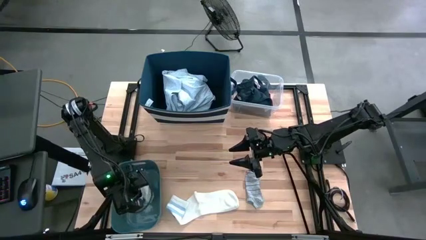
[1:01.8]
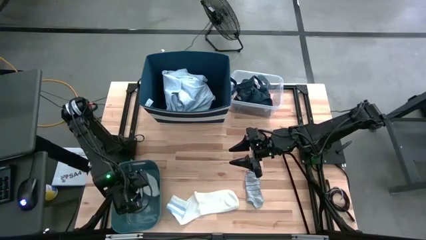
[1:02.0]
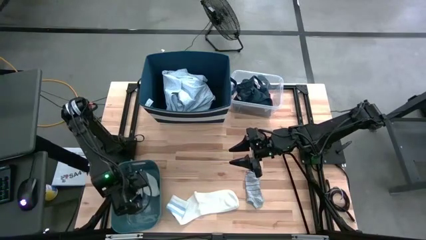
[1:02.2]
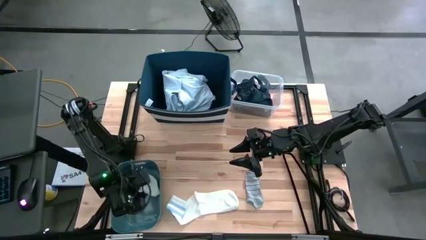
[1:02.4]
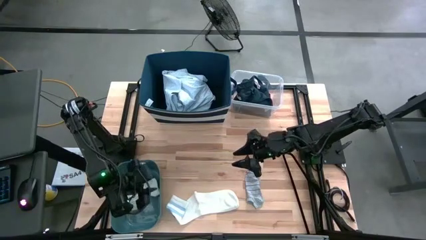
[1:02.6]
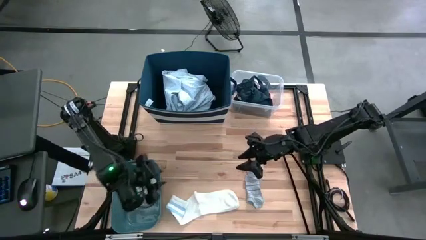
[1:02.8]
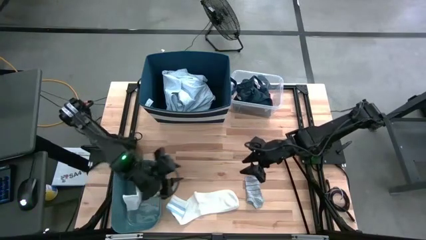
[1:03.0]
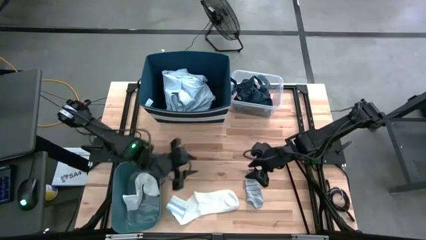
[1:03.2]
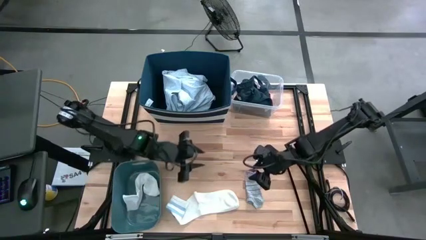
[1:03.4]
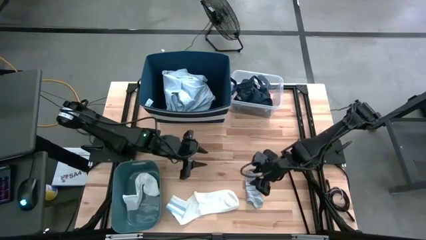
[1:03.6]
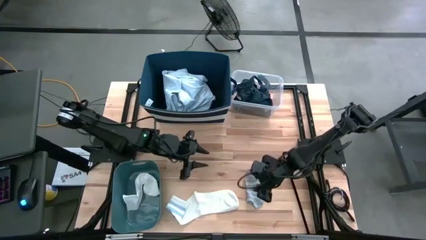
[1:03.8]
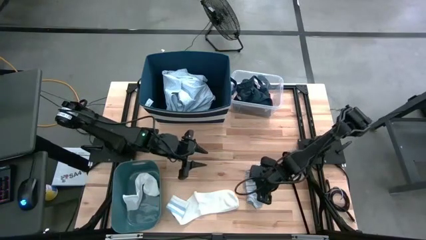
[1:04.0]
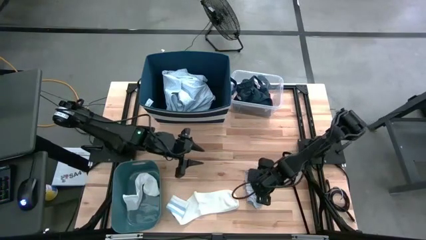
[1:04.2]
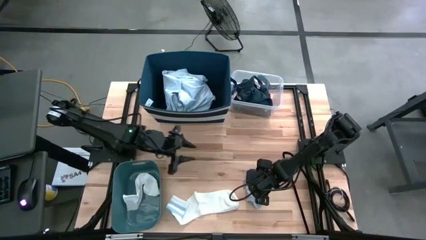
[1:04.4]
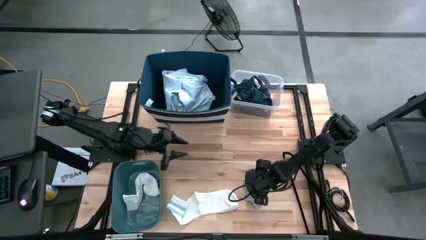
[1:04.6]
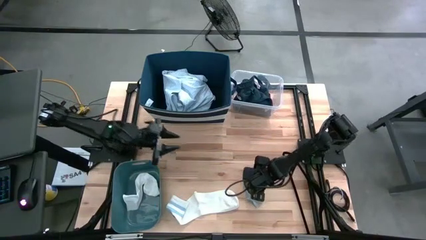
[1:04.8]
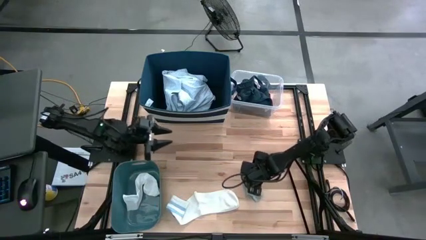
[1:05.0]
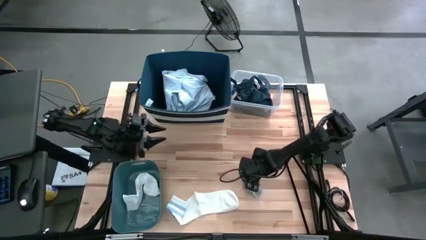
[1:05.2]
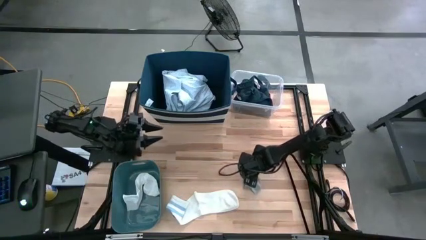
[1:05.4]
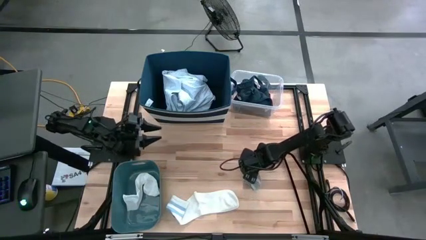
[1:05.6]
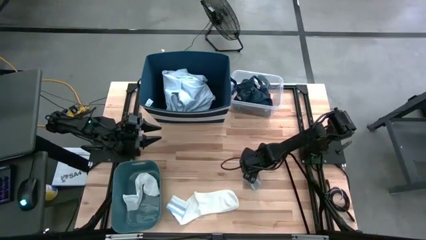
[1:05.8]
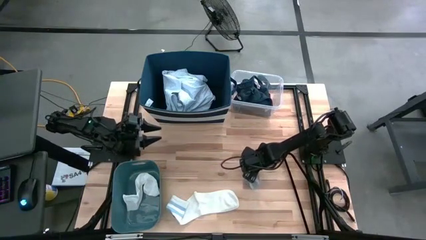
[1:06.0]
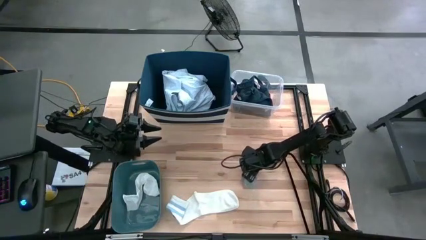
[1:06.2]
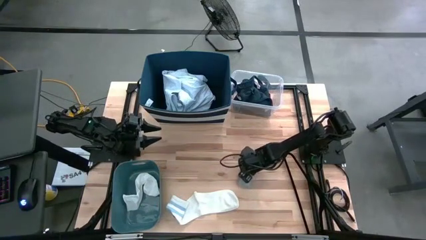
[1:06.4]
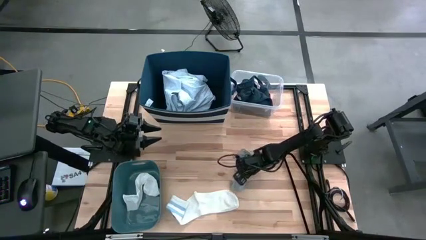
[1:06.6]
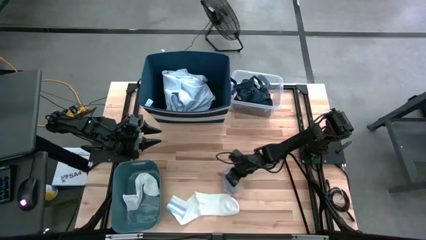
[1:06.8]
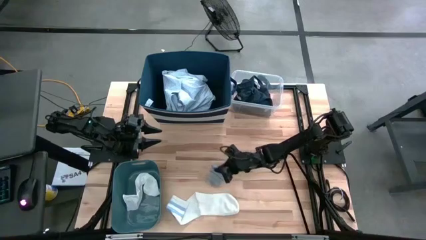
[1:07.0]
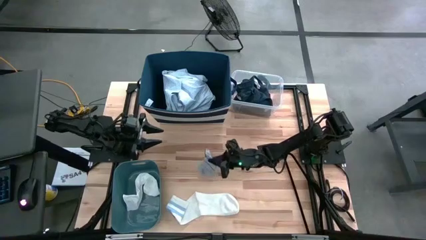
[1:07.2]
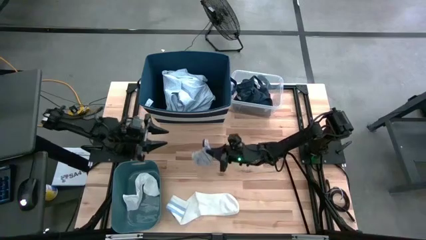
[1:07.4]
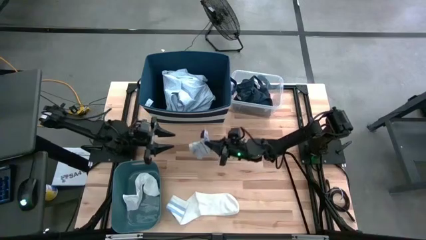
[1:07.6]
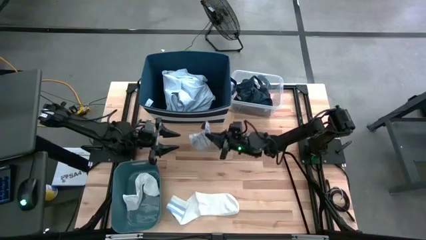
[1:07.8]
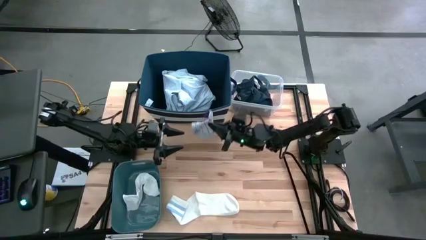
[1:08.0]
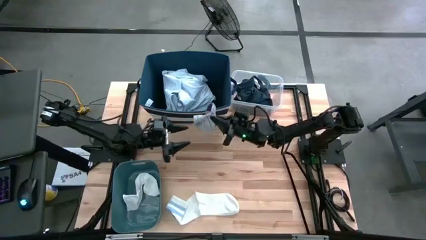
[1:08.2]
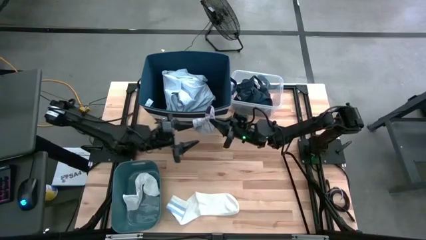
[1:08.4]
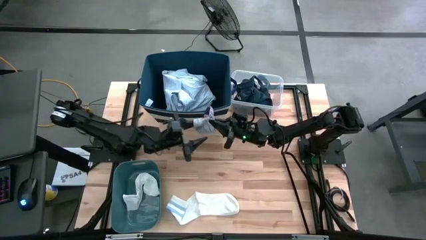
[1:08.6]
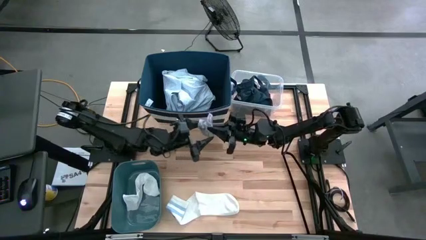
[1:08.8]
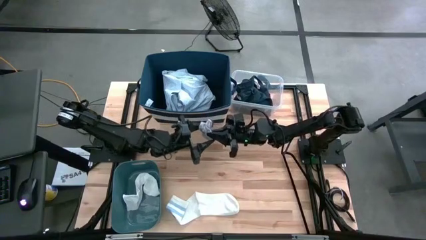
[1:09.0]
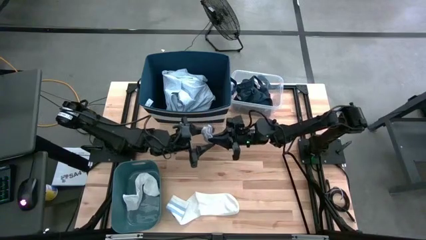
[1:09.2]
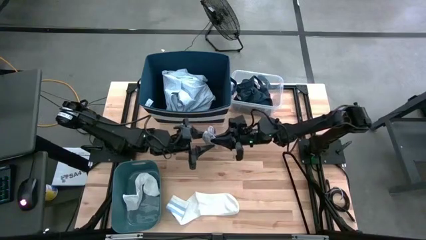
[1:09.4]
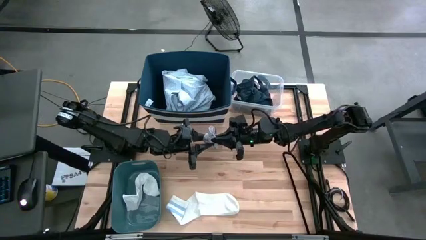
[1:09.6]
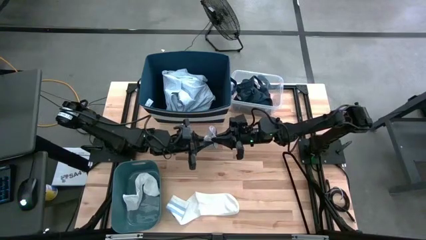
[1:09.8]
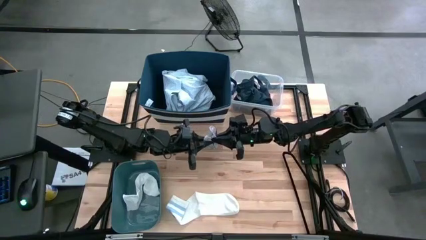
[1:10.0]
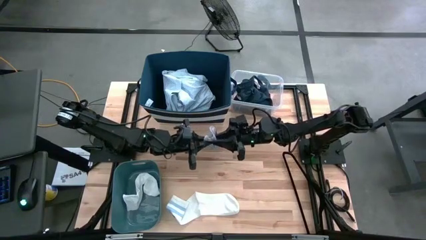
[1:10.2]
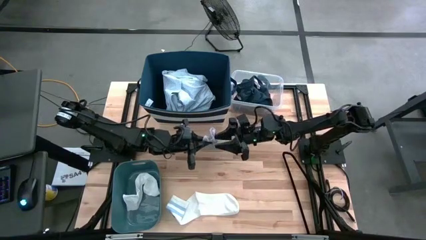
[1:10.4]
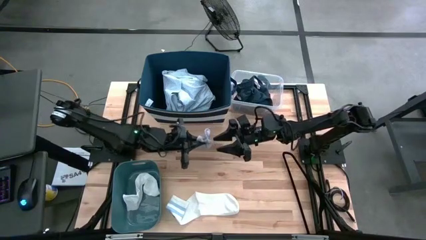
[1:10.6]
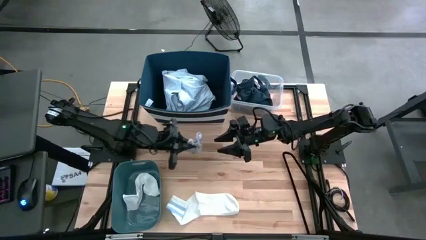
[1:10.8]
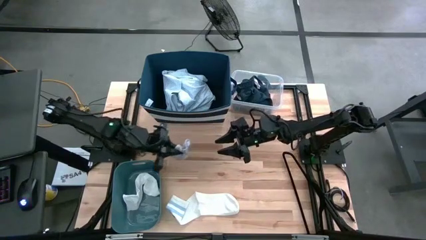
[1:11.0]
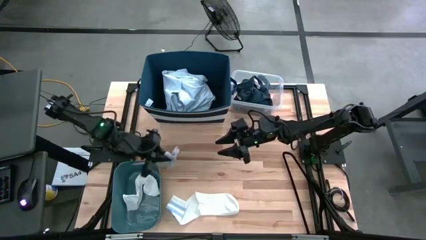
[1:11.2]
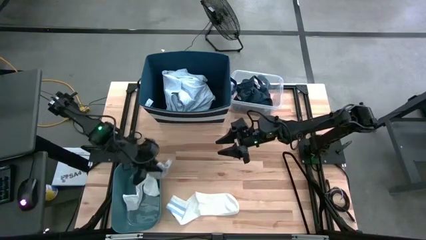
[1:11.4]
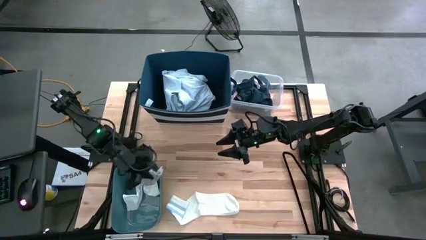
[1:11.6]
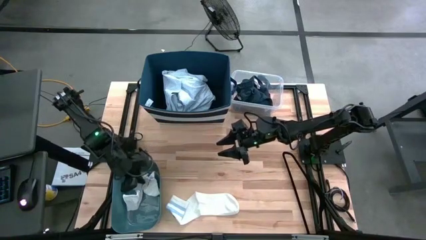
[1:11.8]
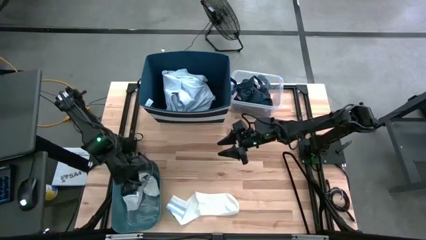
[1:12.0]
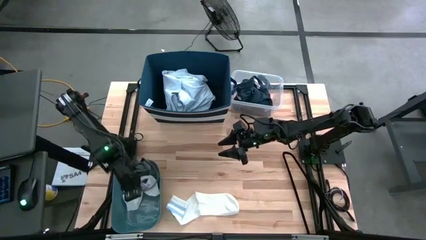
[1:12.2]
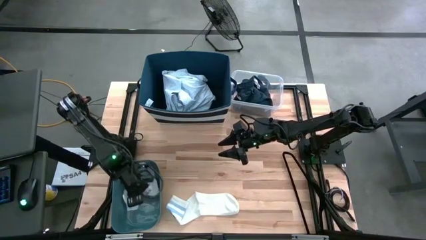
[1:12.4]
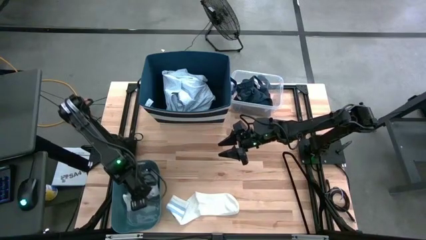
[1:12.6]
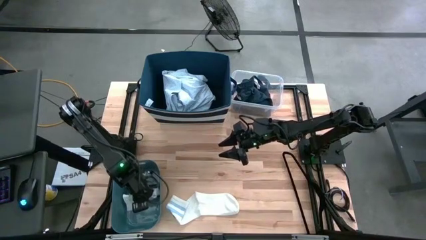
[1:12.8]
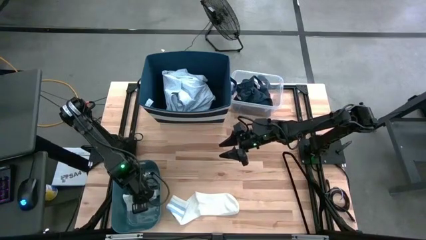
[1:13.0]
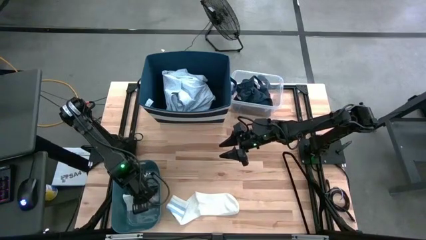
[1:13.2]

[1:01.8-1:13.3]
Task: Pick & Place Cloths
Put the gray sock into the light blue bin

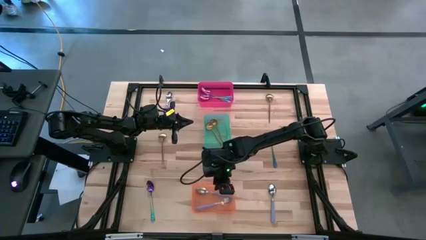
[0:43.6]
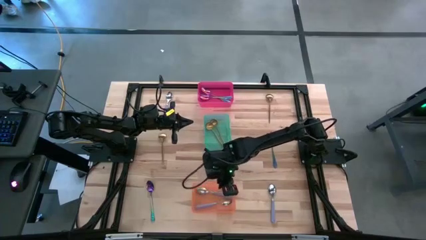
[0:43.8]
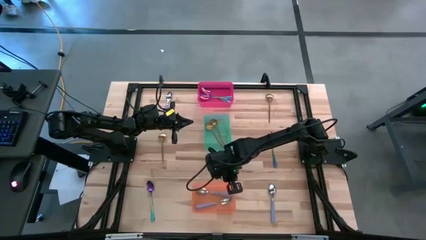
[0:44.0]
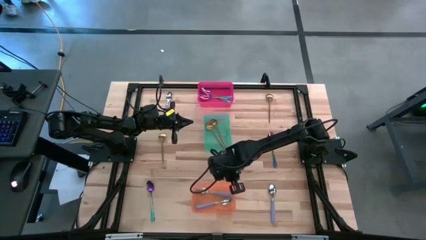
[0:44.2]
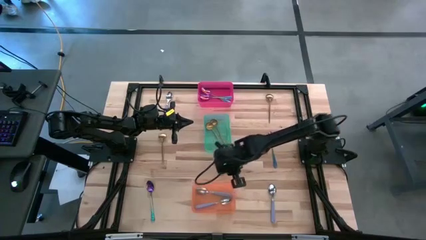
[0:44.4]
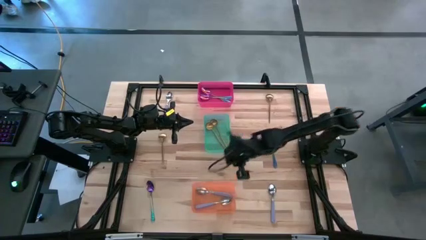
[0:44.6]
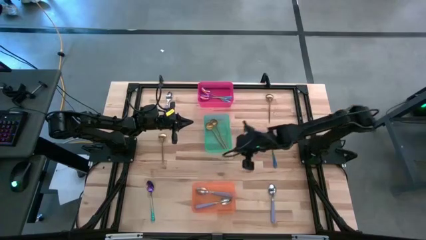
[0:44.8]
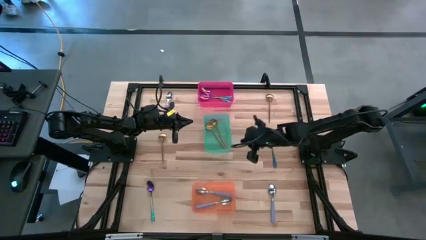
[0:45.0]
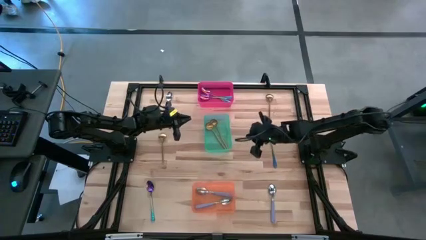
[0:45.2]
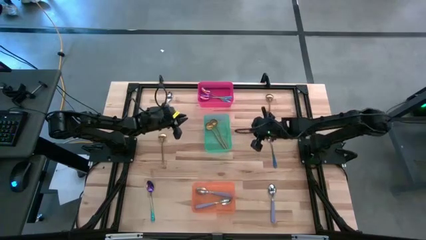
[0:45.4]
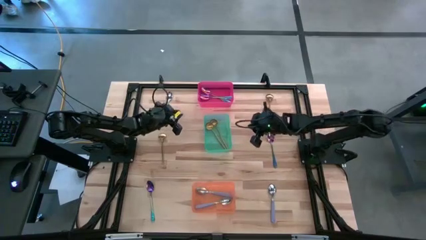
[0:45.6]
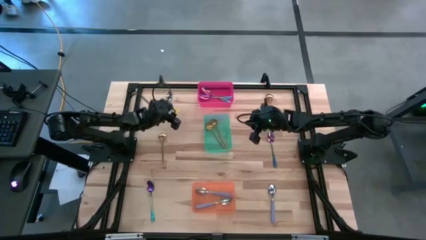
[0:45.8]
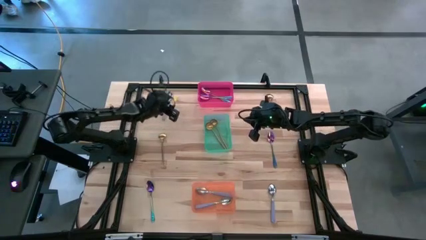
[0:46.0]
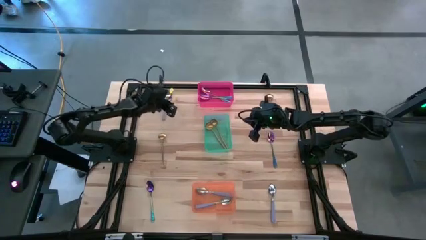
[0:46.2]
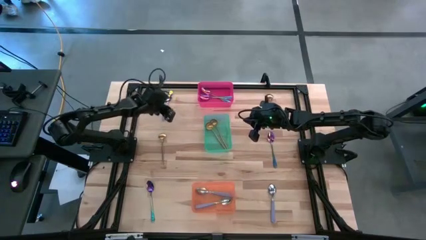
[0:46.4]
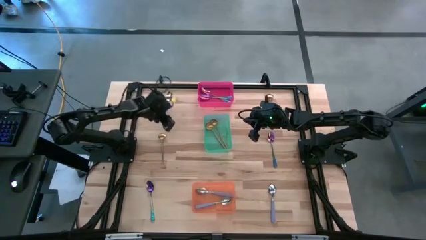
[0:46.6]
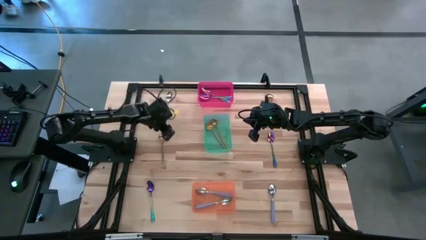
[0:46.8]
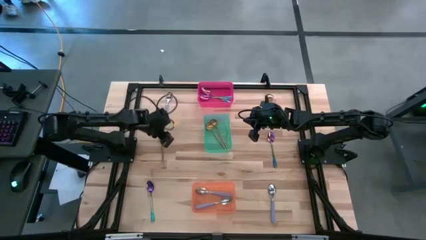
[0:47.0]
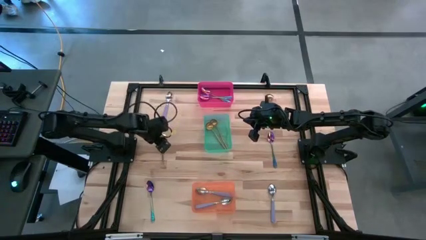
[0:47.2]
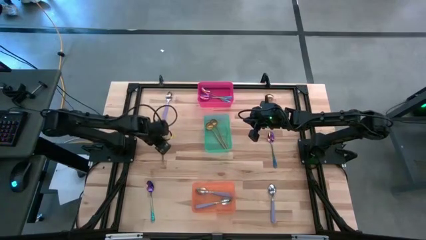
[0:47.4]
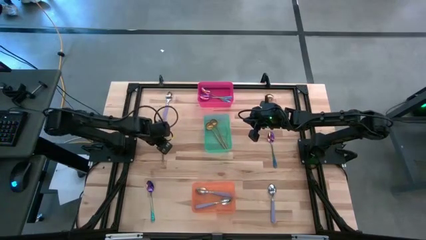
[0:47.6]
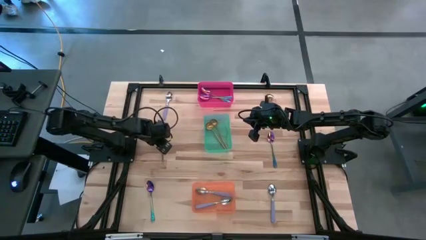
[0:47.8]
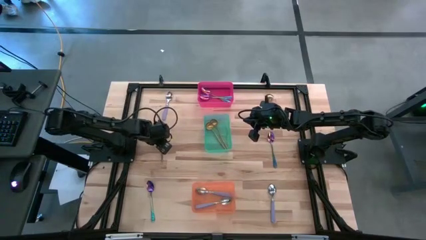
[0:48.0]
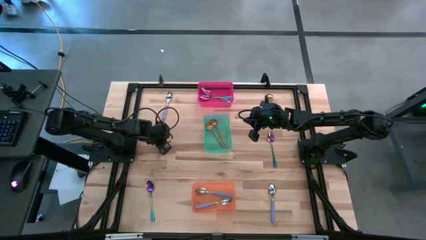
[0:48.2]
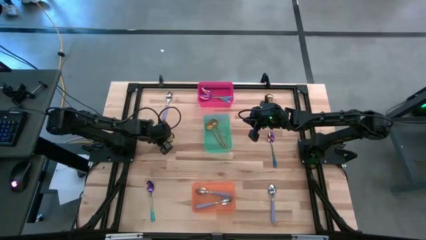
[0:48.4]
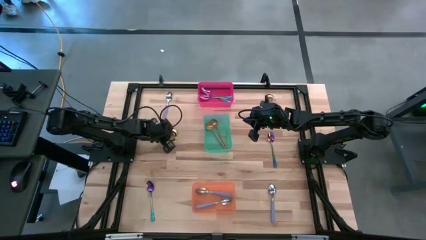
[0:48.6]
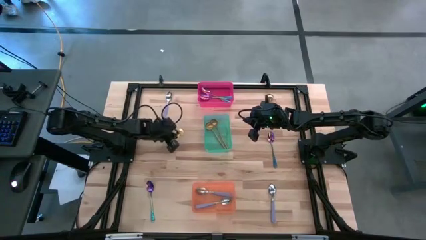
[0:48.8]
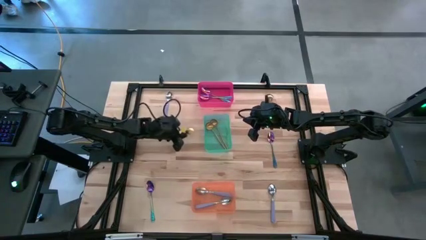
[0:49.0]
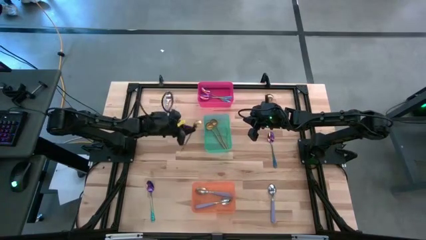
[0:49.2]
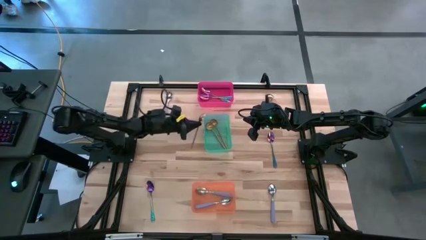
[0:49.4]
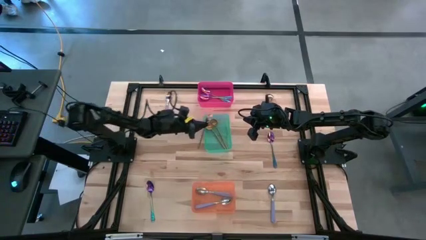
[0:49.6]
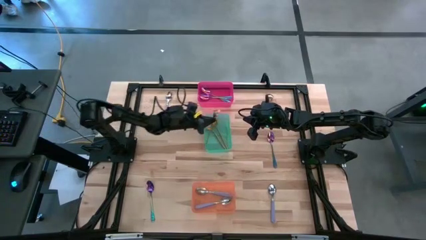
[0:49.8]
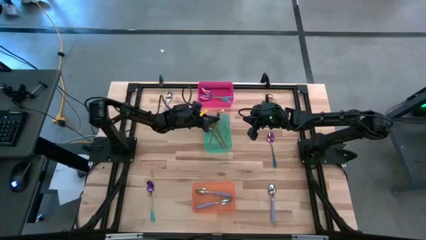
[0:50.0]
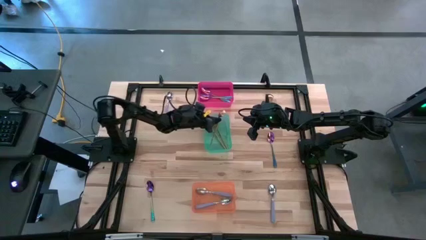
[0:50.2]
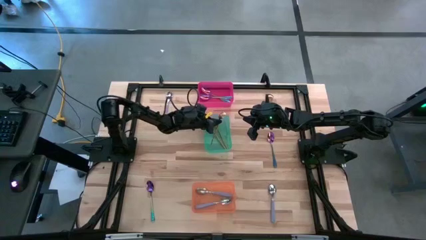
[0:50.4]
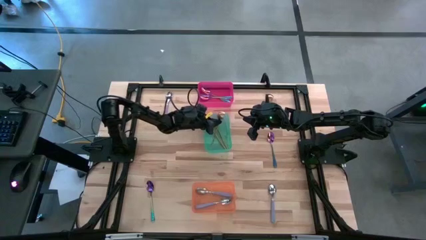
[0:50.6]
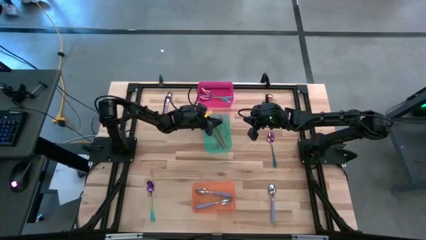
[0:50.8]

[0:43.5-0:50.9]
Task: Sort silverware by color (type)
Put the gold spoon in the blue bin
